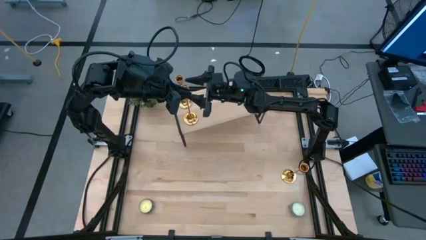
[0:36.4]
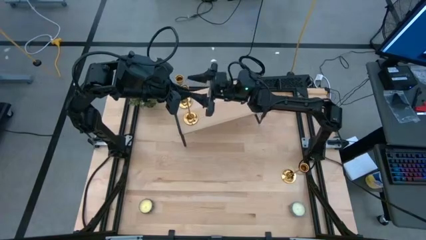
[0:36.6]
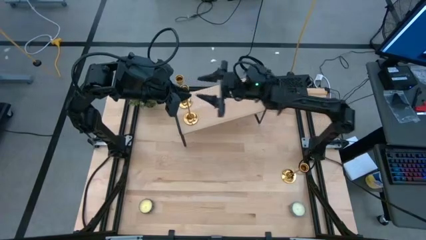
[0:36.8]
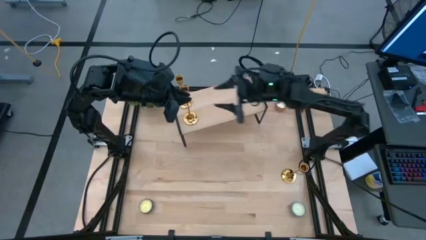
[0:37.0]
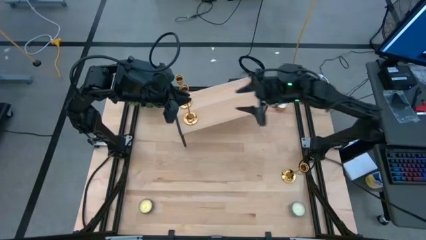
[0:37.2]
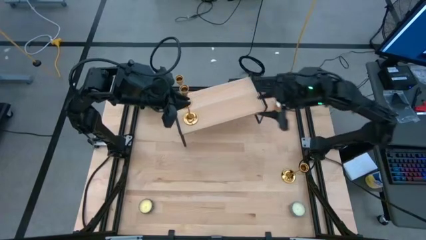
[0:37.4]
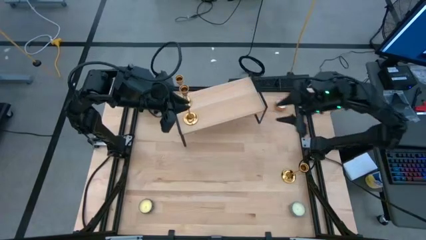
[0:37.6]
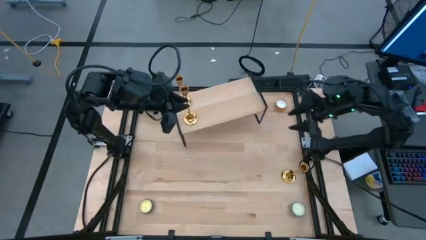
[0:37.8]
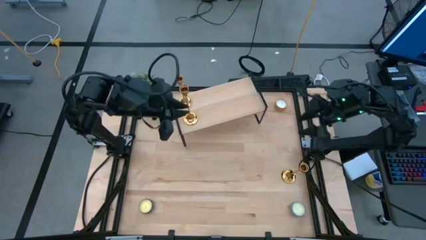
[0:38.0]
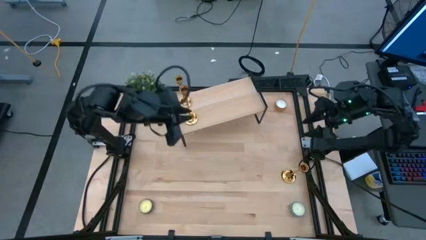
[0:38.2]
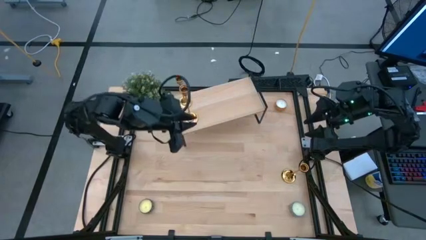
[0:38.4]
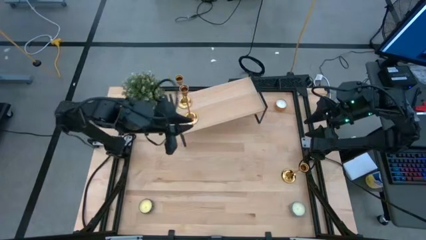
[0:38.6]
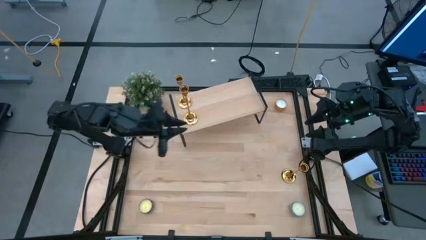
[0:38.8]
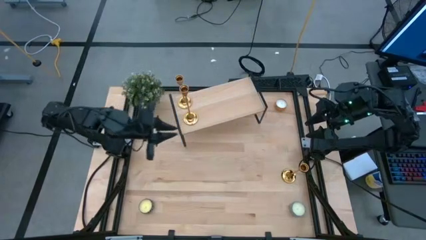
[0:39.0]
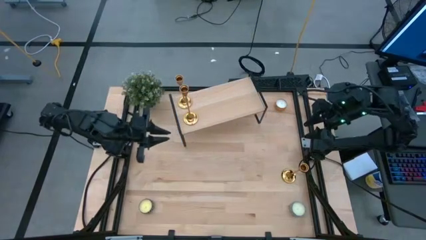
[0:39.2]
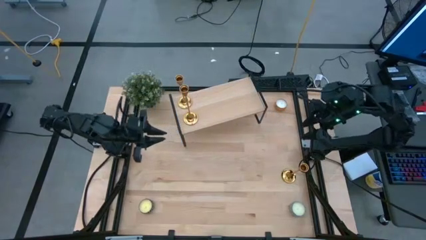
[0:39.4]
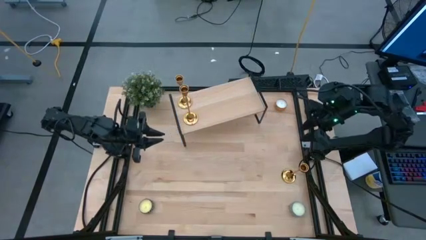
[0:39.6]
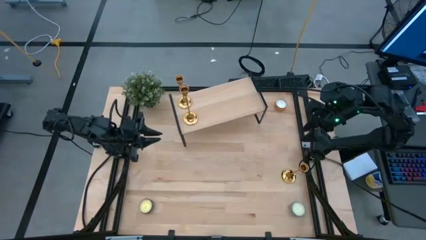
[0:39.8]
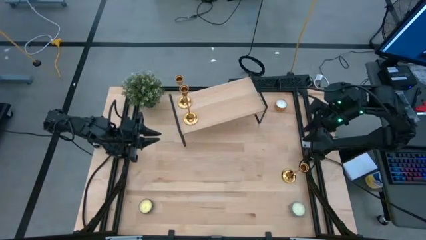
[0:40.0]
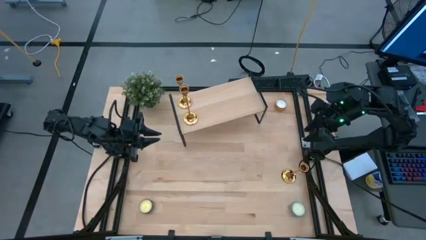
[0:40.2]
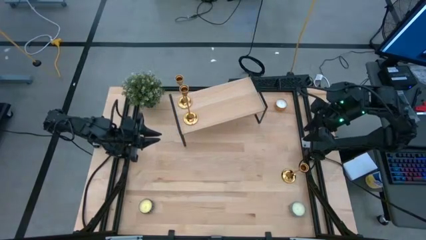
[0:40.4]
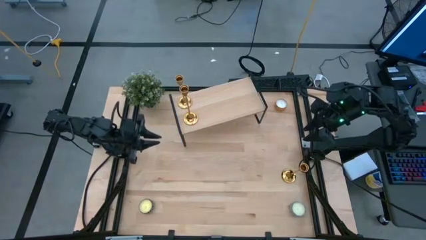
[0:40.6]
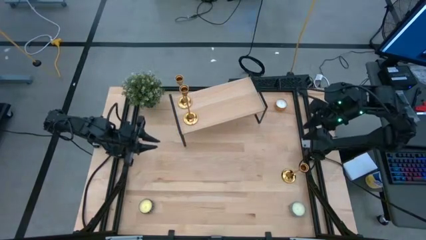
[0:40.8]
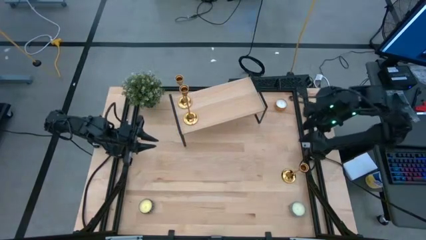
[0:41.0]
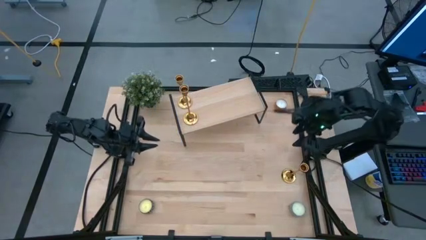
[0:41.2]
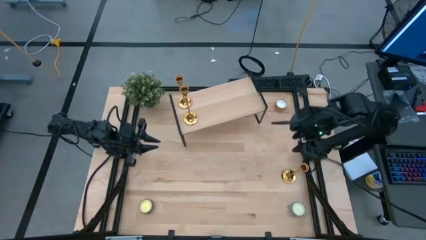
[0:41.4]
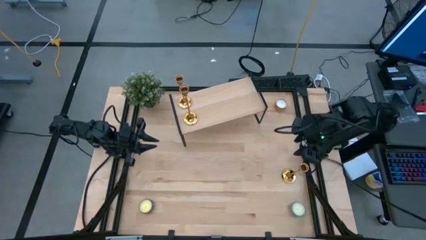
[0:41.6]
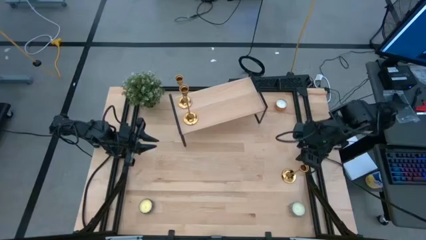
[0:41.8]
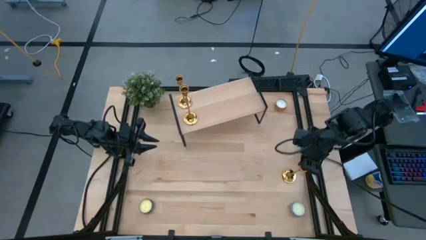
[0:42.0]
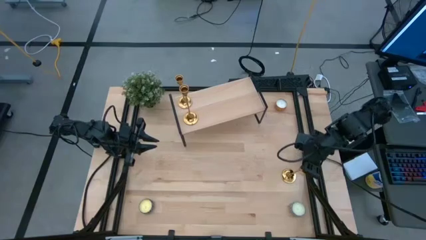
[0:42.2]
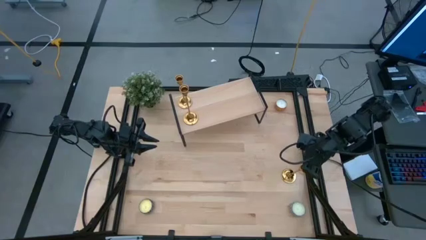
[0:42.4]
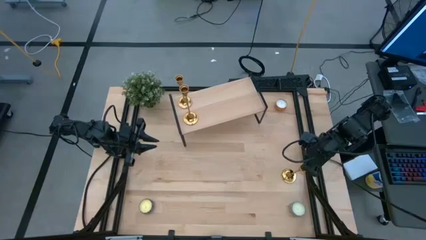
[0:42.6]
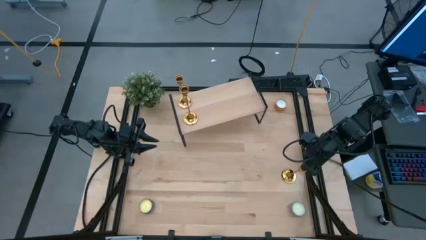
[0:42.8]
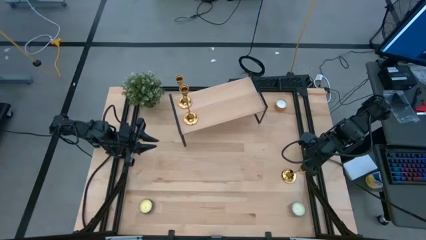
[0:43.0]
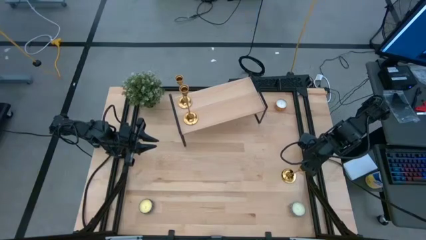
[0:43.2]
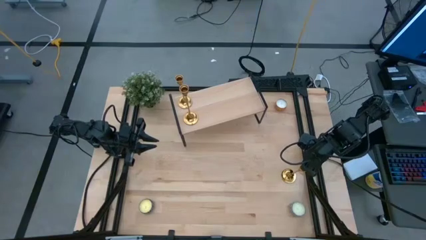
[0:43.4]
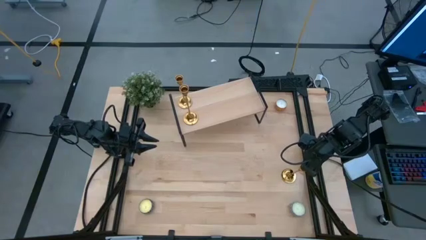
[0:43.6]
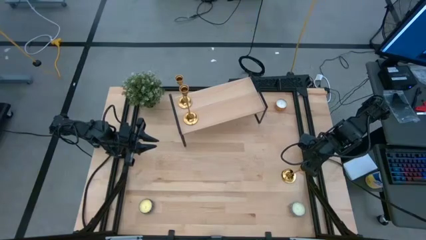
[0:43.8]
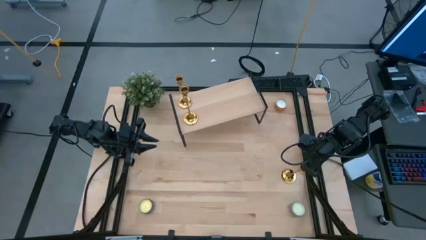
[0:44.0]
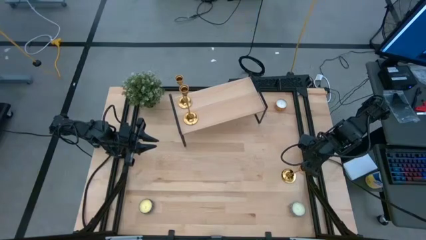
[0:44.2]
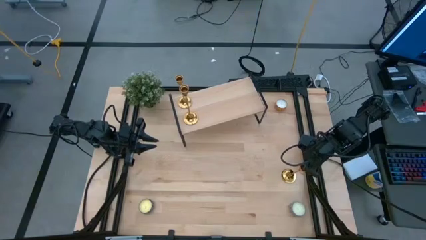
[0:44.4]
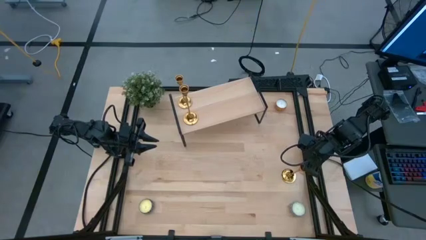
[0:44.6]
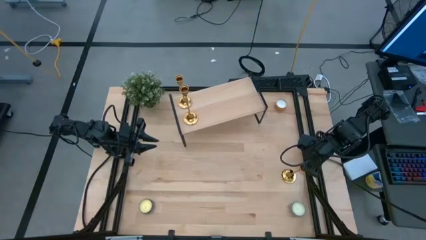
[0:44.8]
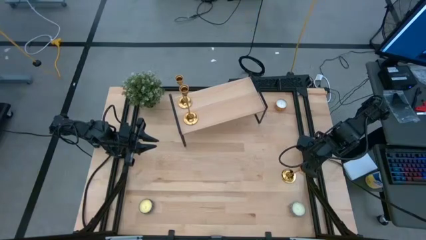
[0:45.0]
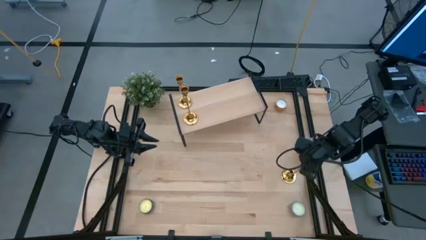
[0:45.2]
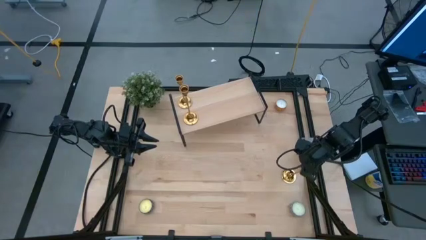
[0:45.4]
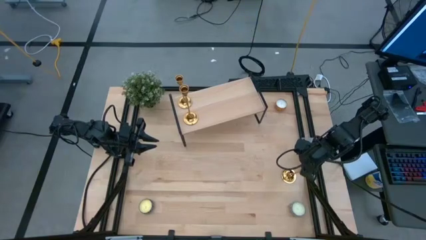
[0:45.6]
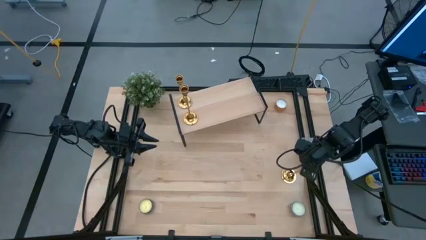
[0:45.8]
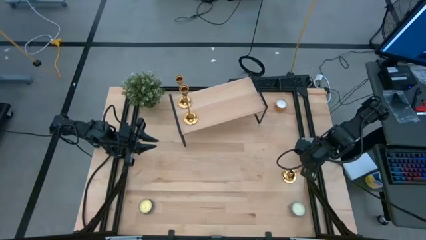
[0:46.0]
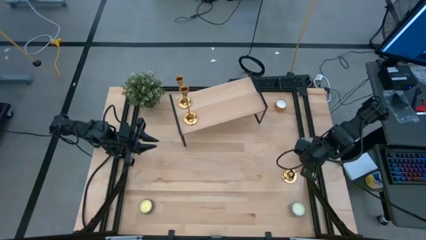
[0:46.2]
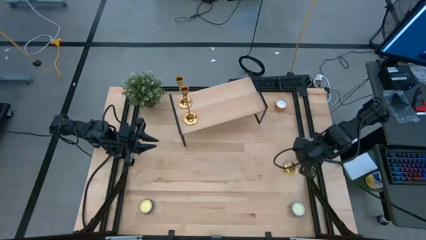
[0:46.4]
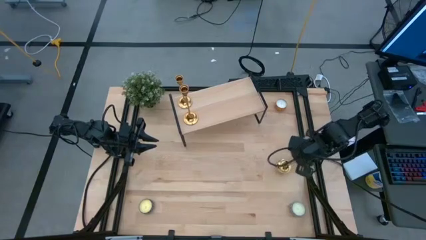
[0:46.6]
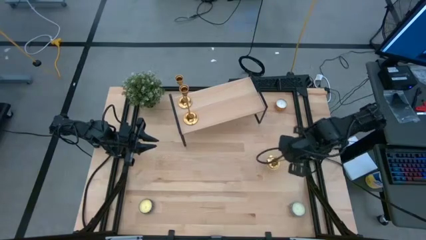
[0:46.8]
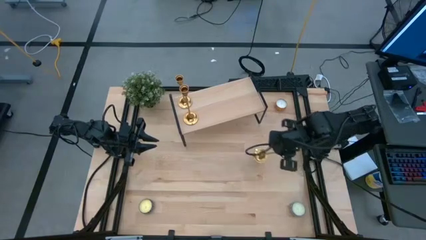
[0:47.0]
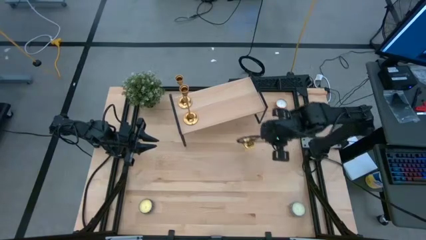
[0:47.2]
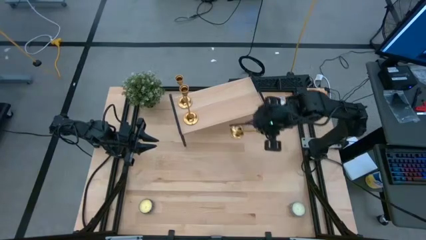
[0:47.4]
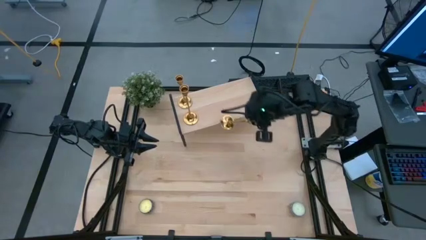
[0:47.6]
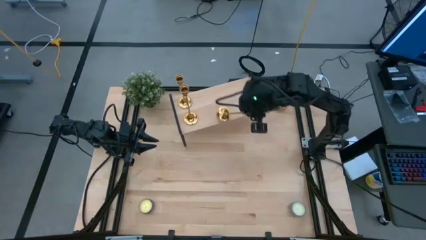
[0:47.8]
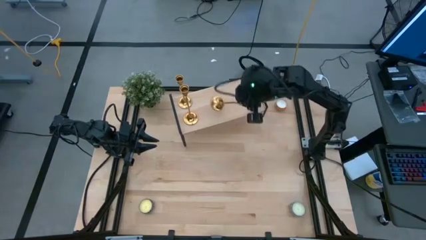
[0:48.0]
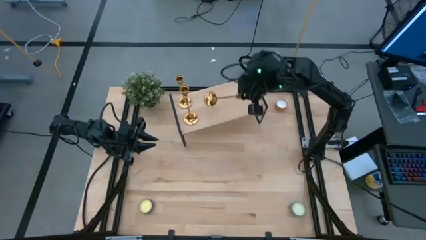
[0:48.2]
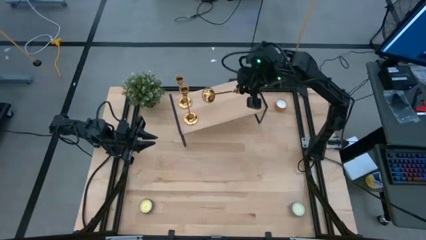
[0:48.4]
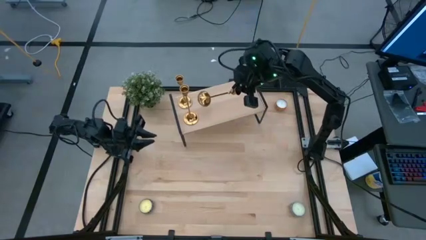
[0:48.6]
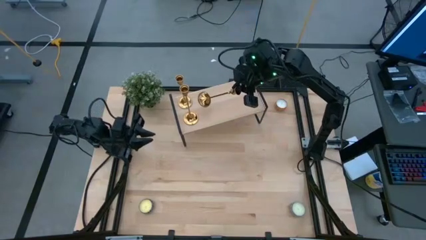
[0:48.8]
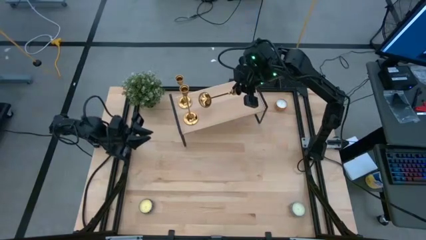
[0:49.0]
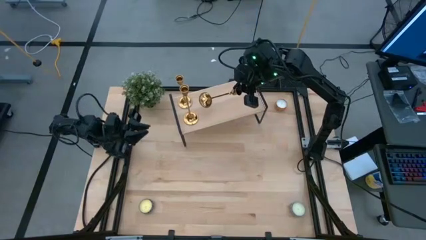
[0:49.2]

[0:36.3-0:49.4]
Task: Pick & Place candle stick holders
Put the gold candle holder on the shelf
